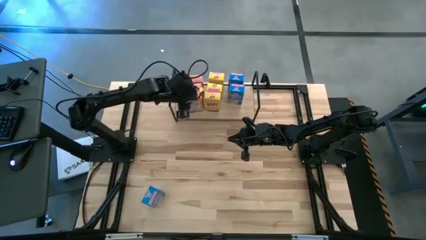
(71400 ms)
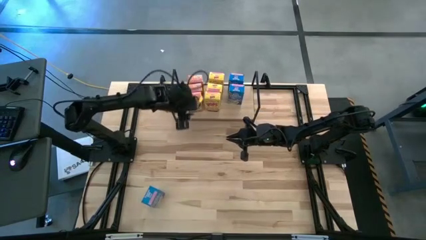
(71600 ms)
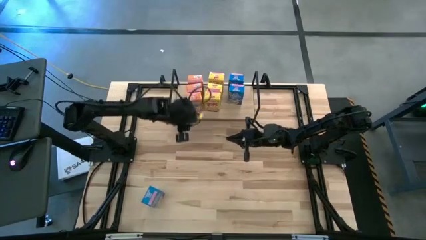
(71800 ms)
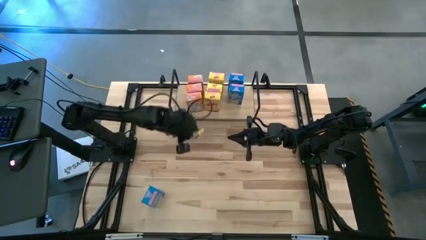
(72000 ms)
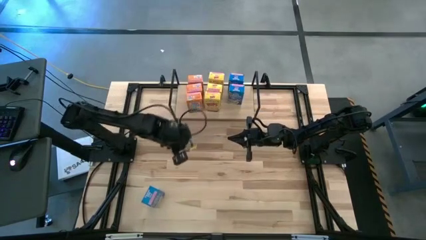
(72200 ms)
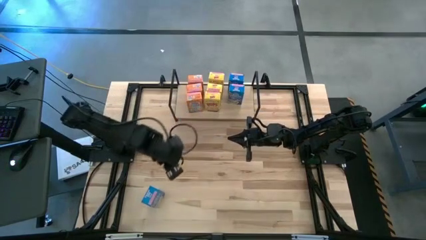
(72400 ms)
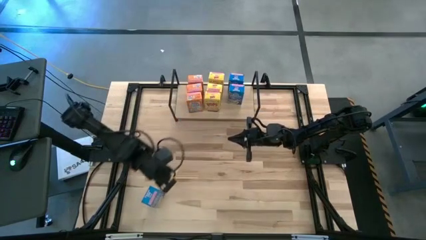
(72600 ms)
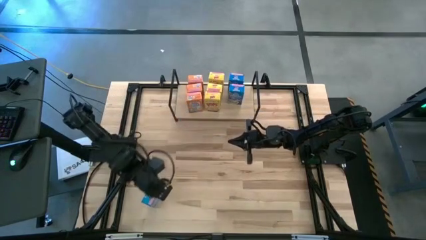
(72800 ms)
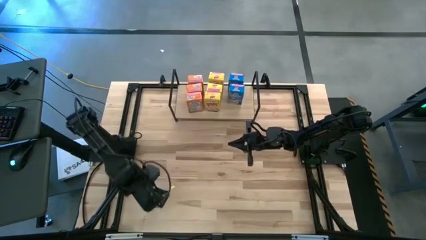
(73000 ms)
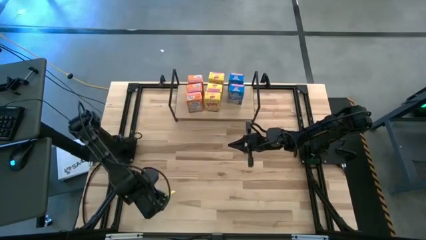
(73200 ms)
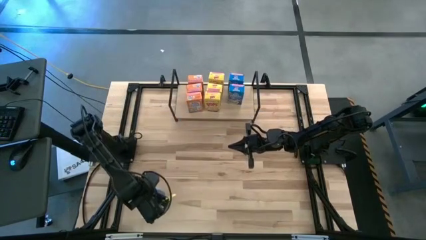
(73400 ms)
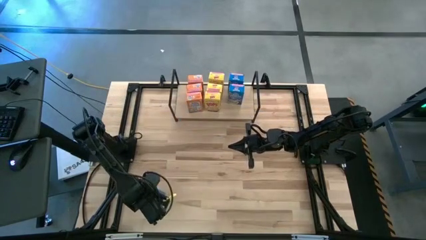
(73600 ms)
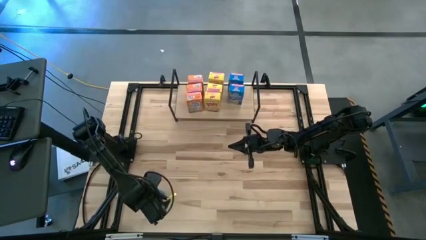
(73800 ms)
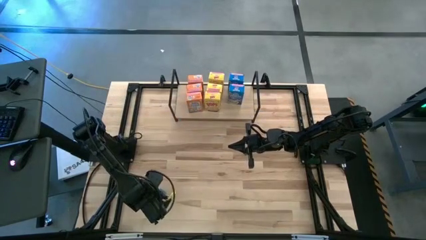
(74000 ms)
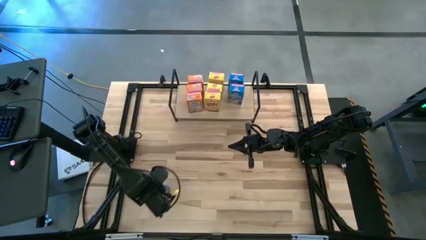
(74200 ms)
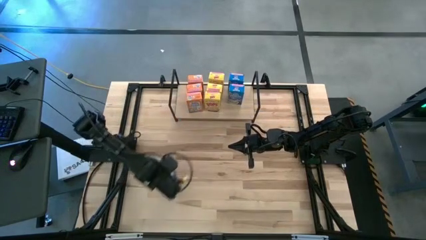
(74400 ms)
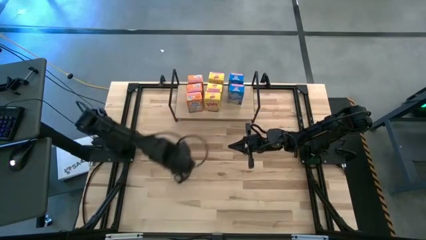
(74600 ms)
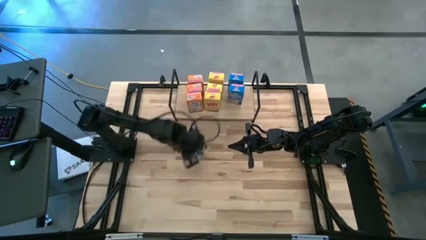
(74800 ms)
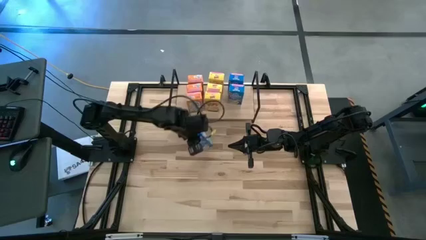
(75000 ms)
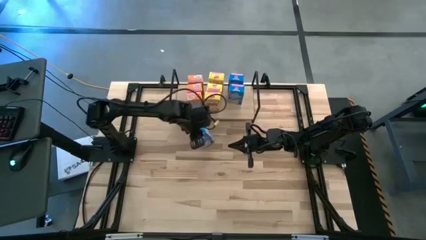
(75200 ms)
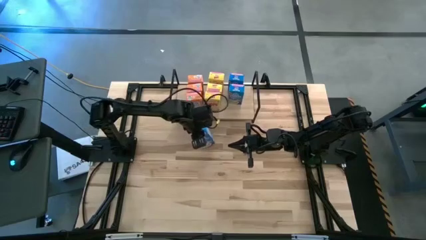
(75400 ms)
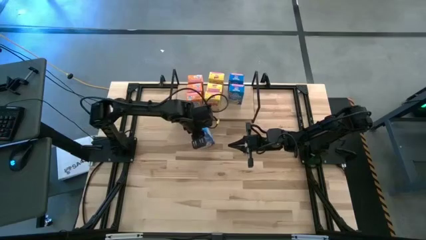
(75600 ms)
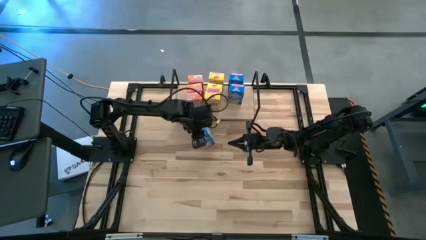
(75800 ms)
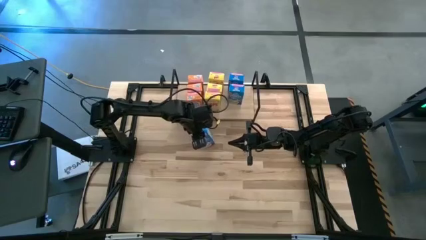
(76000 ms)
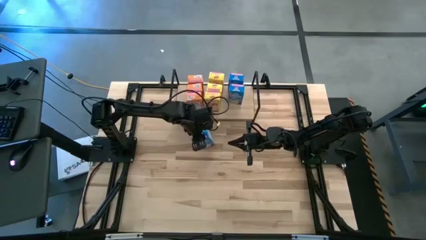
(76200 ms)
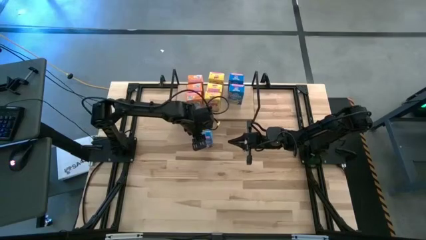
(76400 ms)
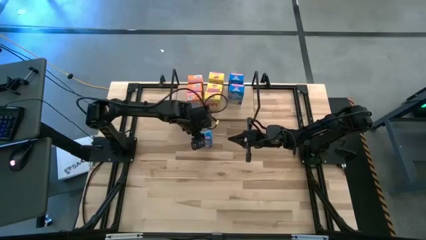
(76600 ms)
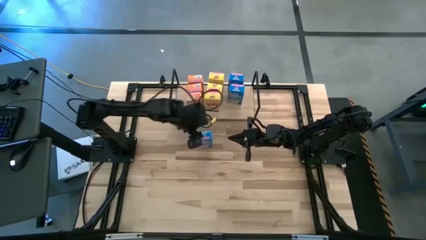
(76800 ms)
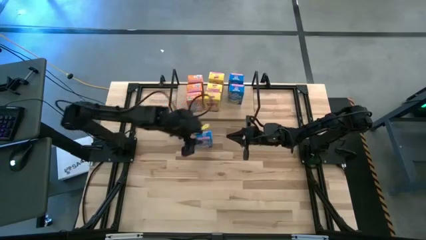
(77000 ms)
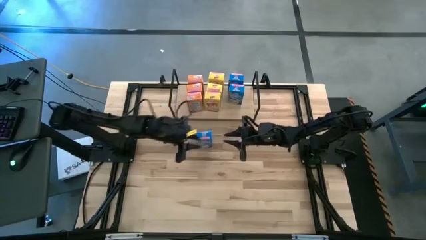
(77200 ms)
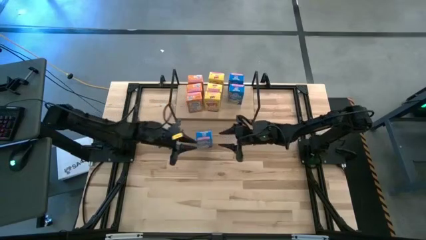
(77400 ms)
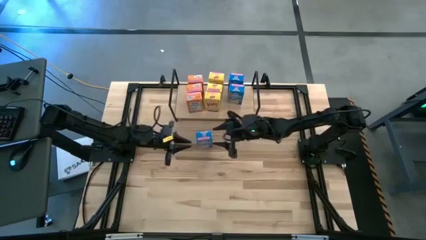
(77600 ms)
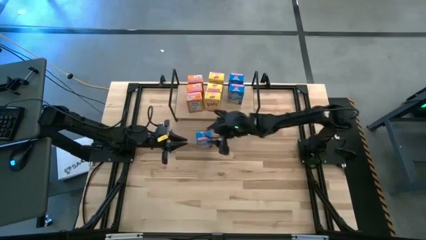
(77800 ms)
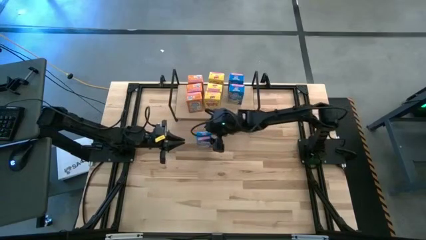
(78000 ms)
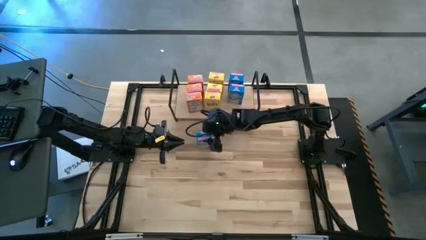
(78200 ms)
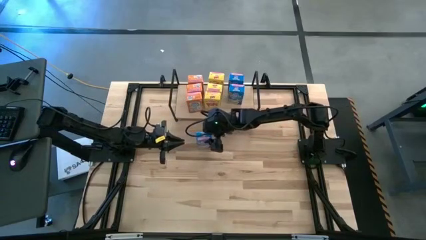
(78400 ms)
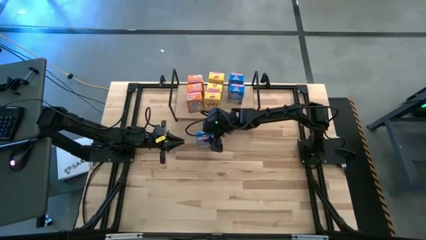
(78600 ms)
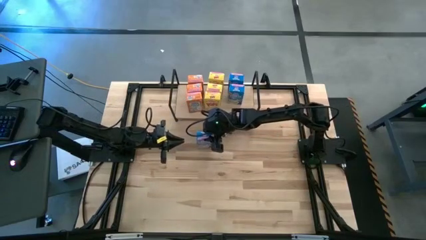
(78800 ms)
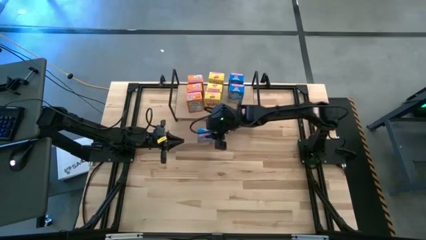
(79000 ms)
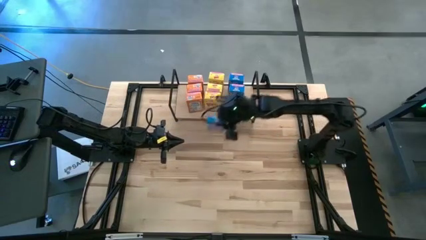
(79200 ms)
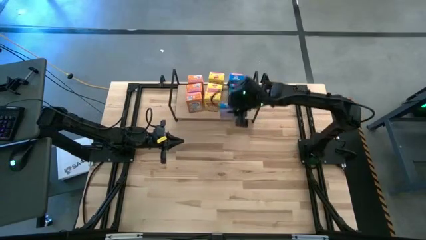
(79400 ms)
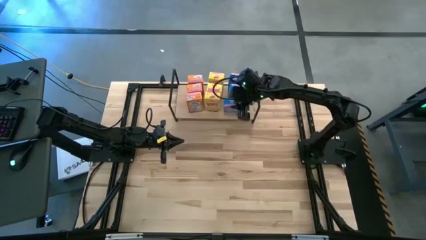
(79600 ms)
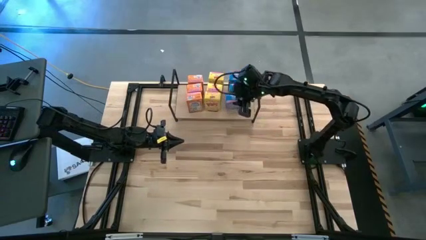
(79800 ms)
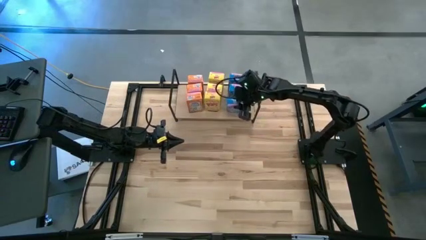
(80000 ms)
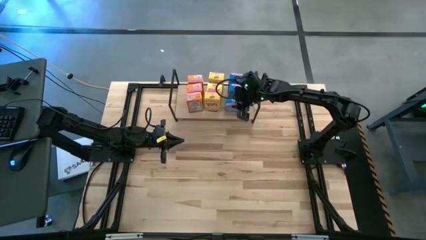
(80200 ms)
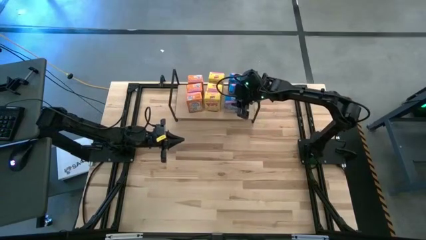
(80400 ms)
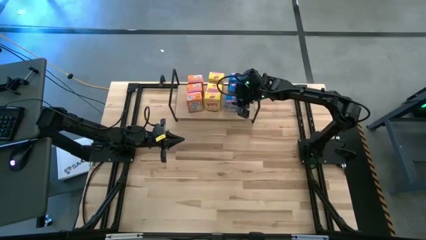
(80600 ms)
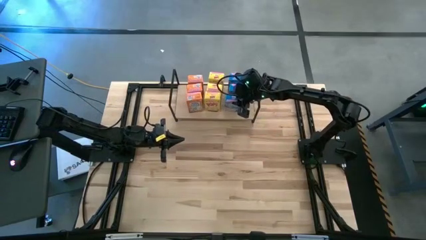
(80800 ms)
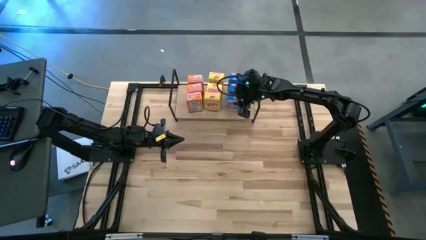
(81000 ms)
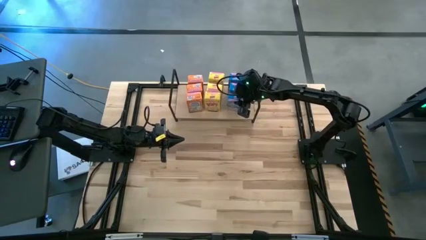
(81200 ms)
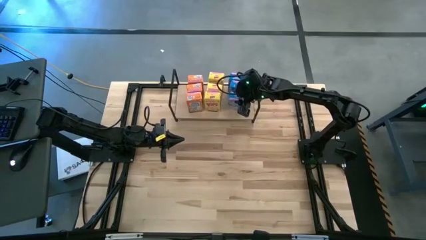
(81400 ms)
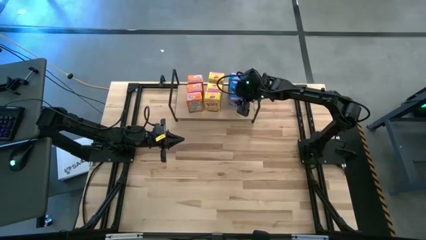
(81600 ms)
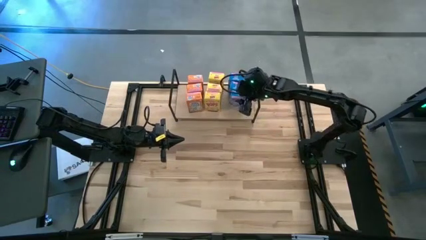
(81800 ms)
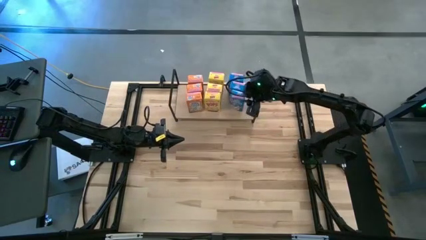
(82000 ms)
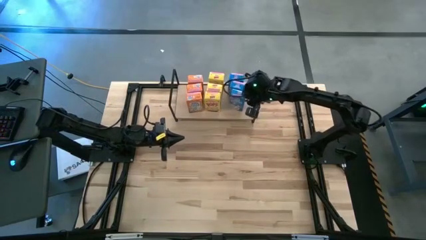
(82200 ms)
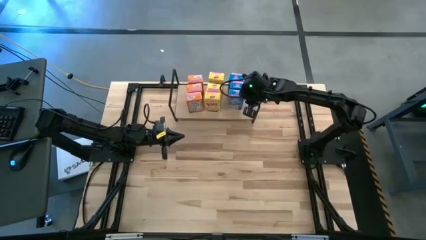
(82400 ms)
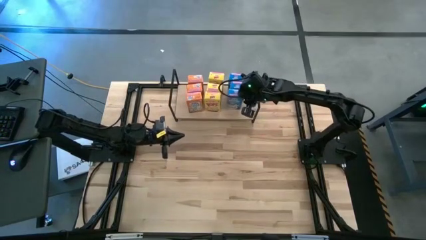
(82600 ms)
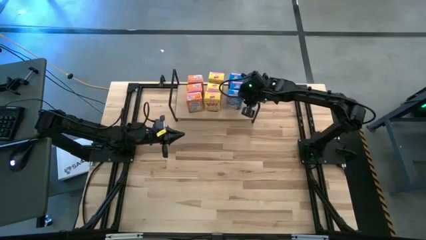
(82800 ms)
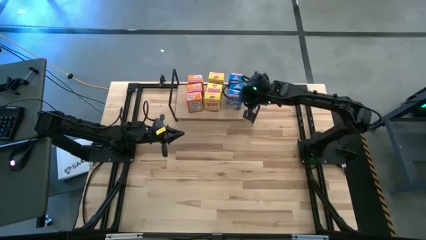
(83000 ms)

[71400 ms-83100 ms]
Task: Stack cereal on shelf
Put the blue cereal box on the shelf aligned with the other blue cereal boxes

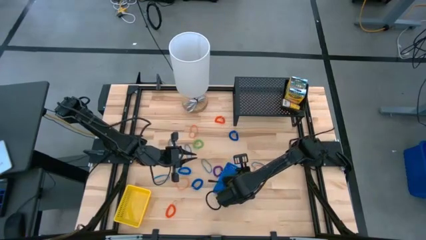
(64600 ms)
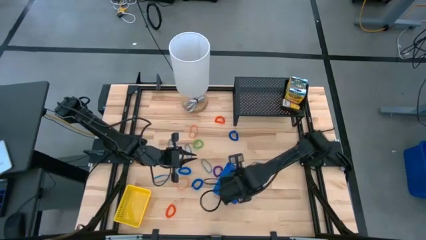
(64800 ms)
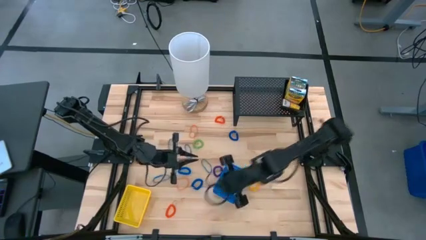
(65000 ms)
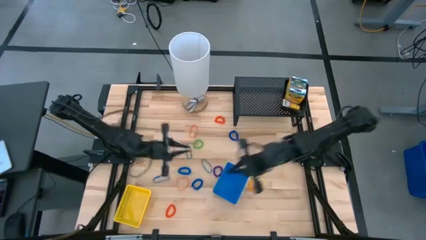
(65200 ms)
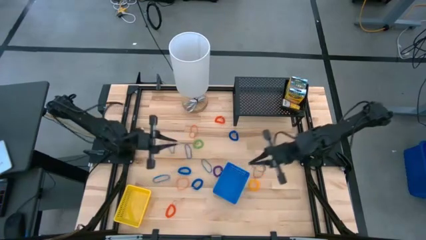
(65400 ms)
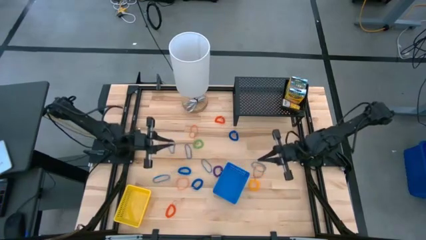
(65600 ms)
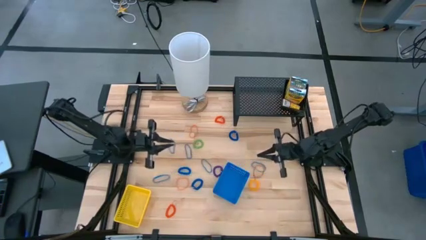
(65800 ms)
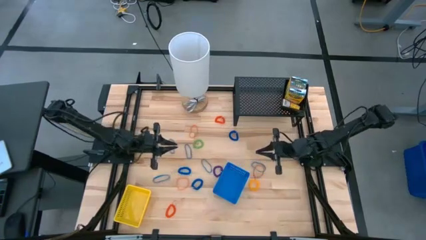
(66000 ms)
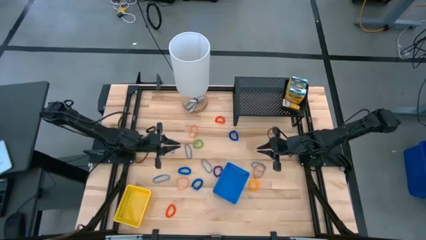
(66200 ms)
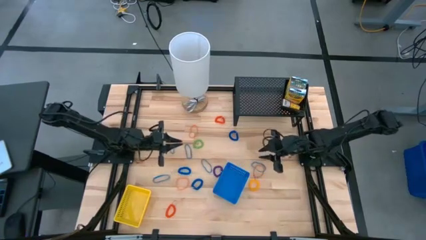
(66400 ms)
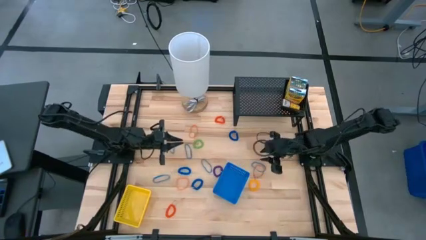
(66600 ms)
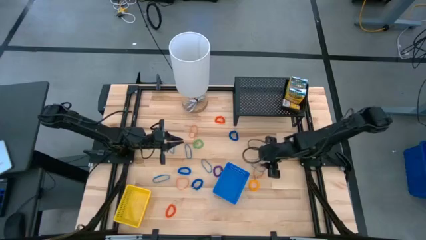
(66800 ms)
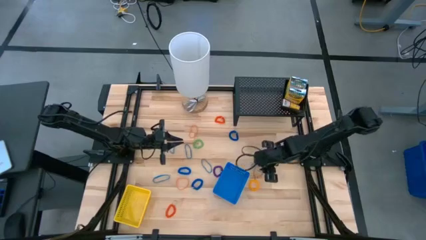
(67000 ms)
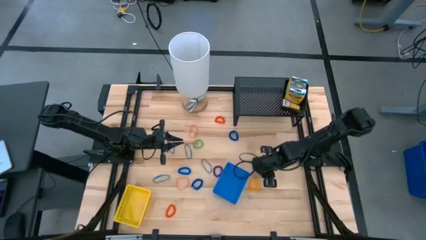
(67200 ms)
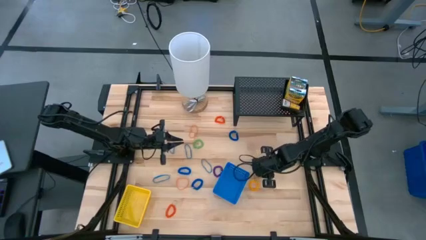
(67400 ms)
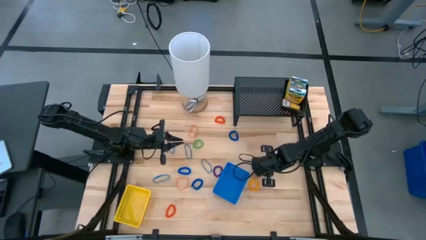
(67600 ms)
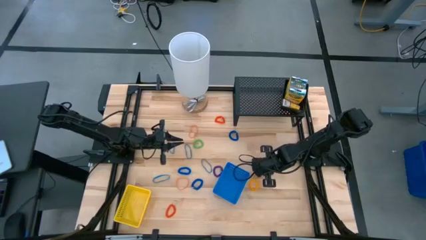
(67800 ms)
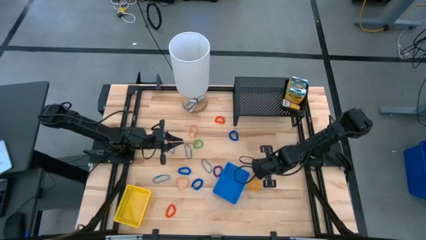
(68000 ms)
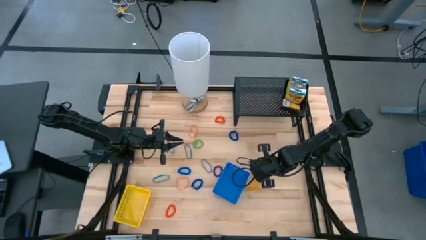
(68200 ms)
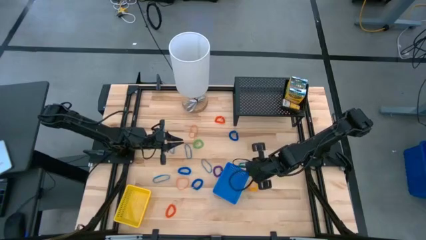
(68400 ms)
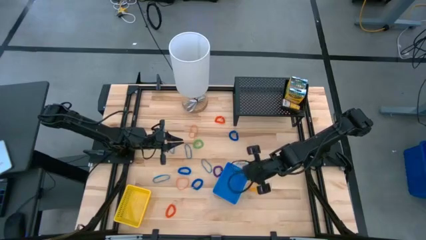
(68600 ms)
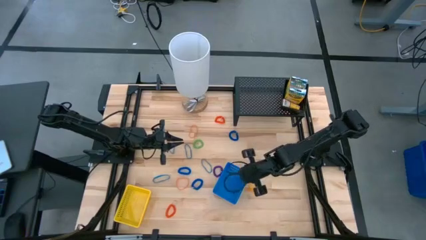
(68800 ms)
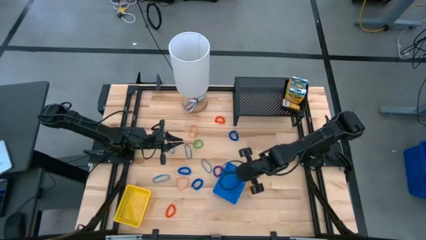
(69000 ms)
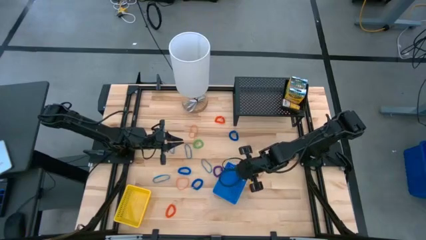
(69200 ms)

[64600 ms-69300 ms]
Task: Pick & Place Office Desk Supplies
Put the blue rubber band into the blue bin
